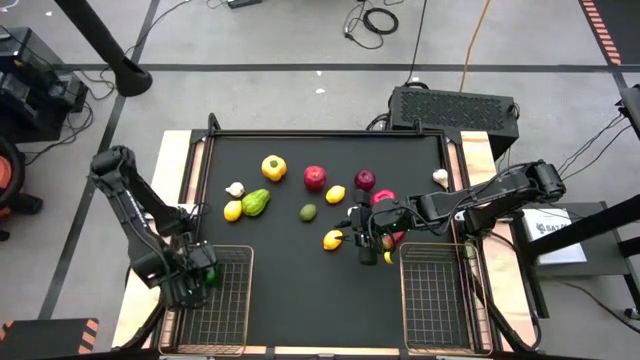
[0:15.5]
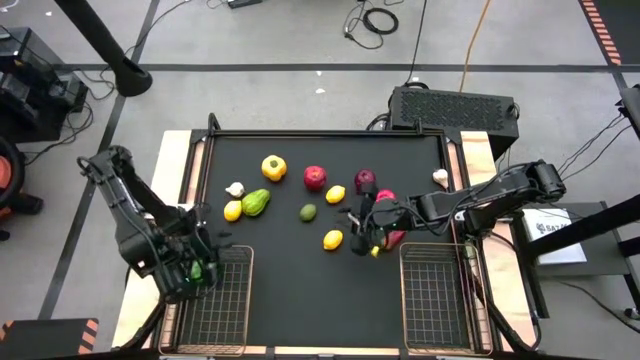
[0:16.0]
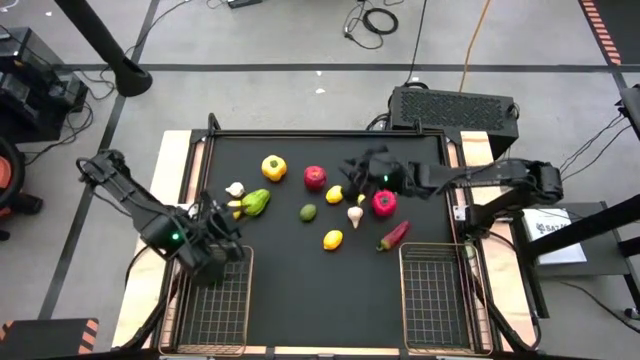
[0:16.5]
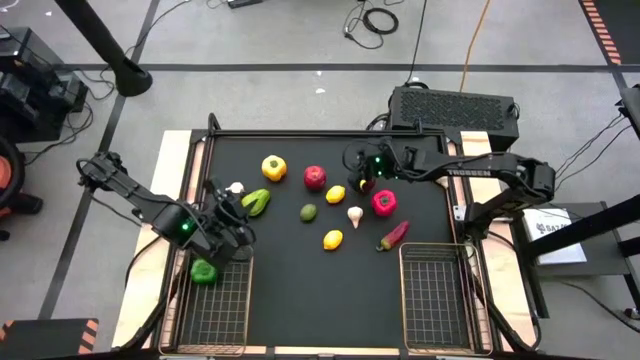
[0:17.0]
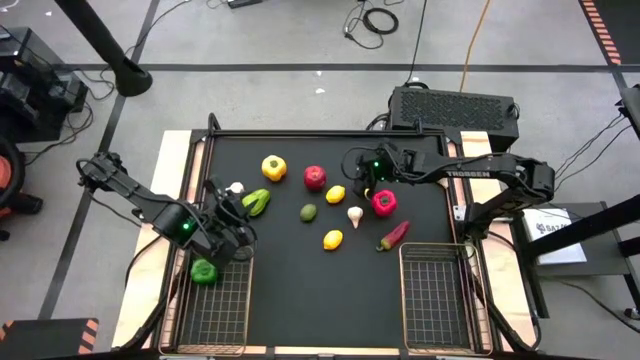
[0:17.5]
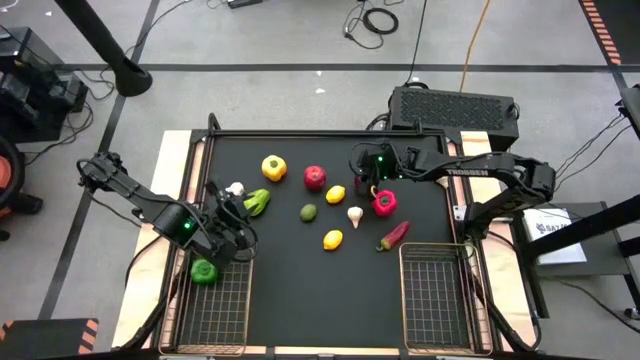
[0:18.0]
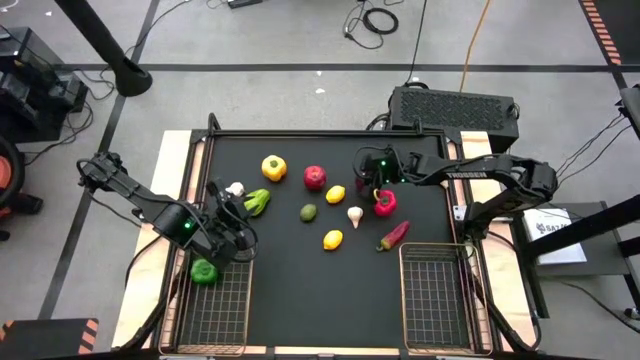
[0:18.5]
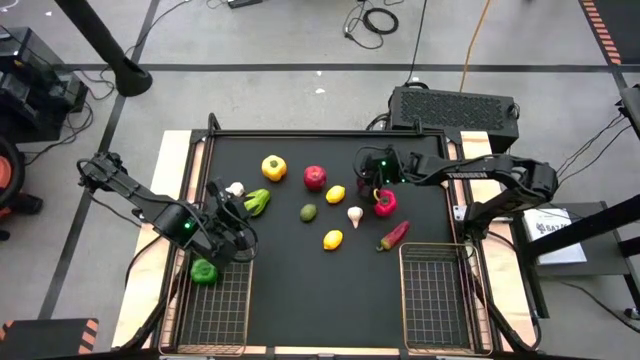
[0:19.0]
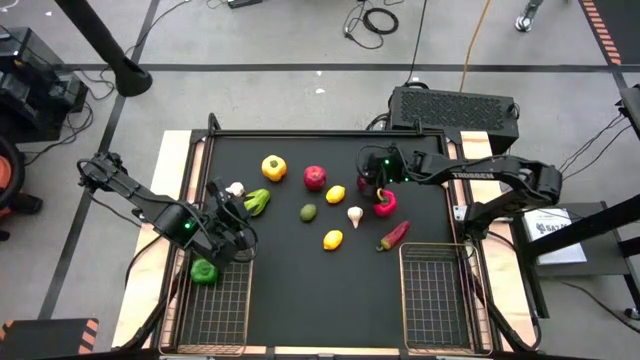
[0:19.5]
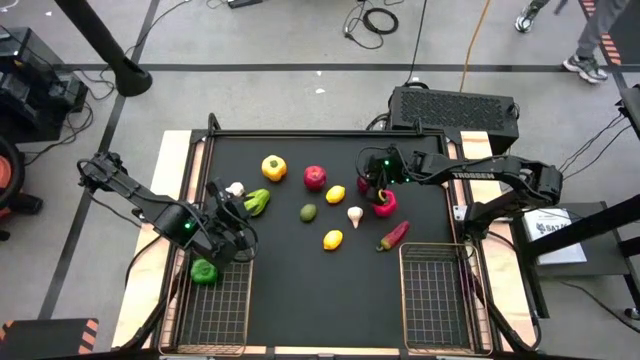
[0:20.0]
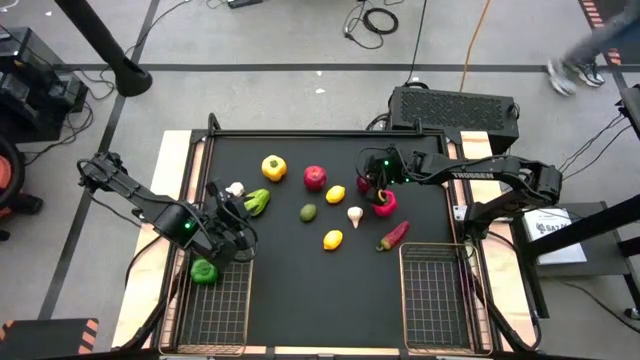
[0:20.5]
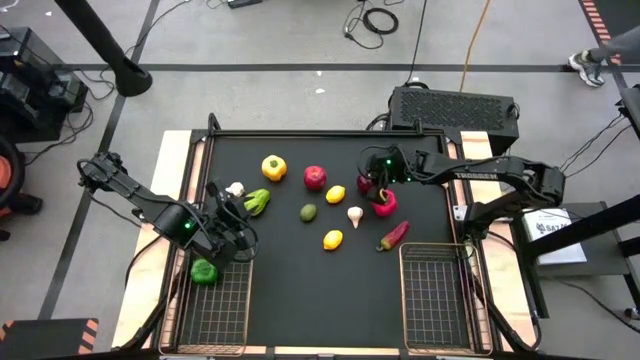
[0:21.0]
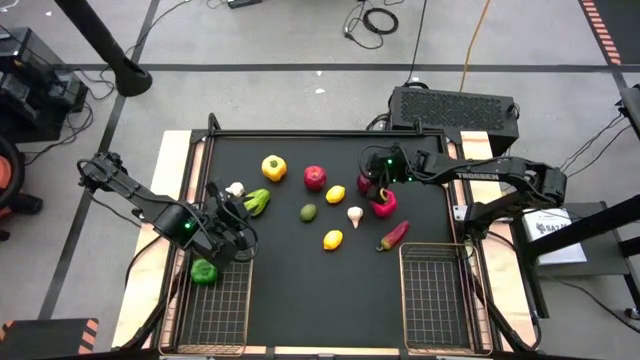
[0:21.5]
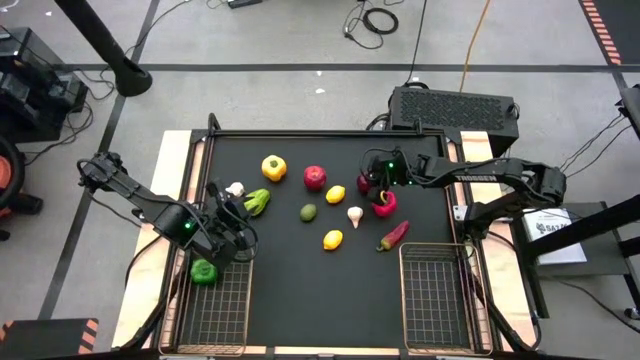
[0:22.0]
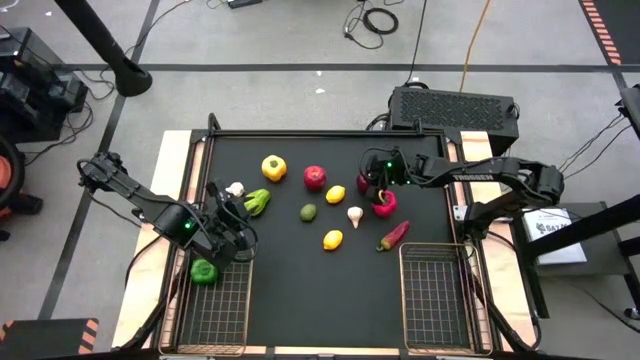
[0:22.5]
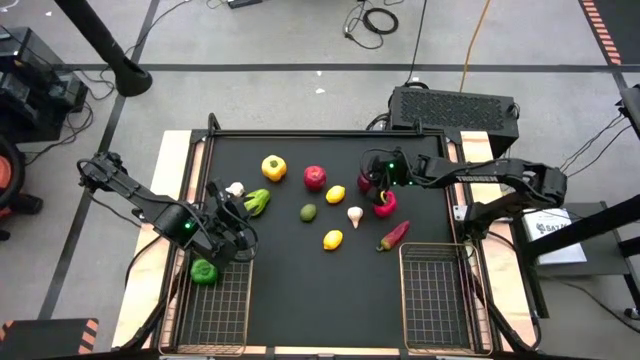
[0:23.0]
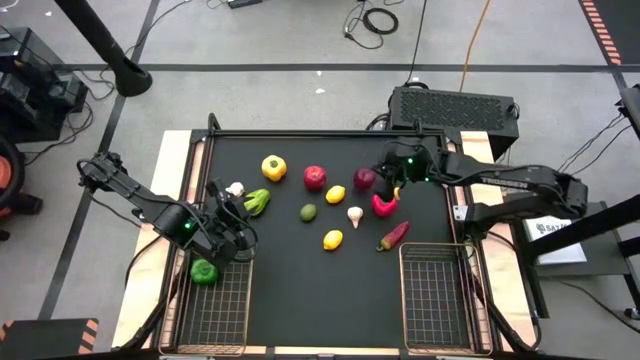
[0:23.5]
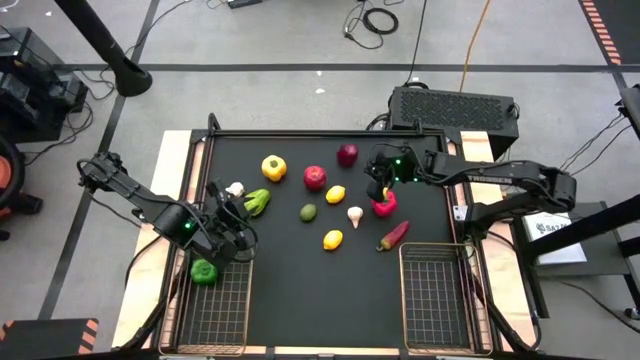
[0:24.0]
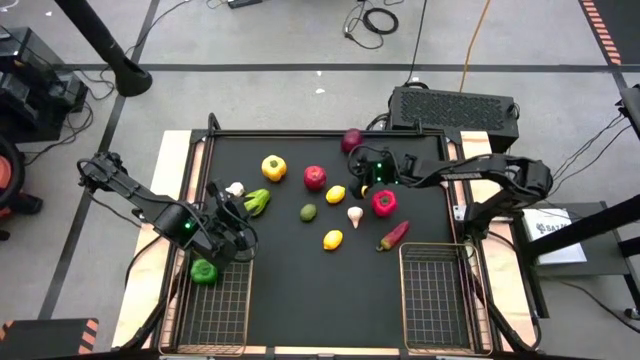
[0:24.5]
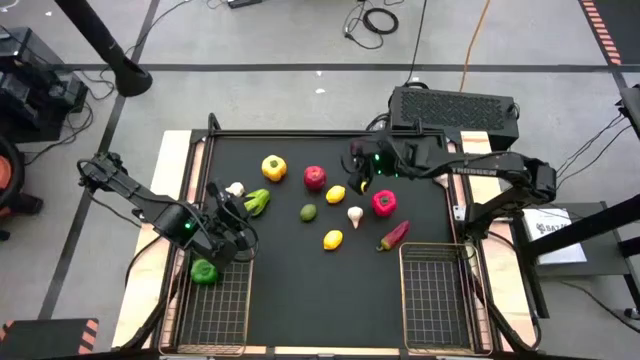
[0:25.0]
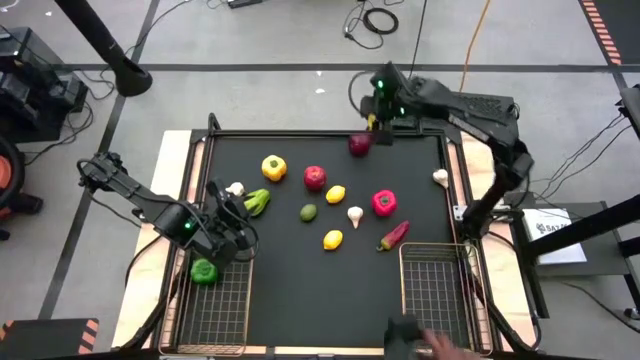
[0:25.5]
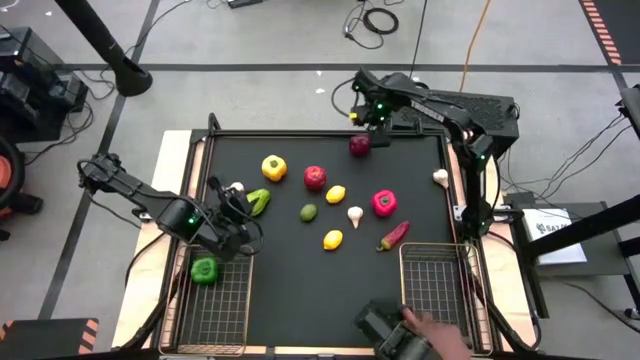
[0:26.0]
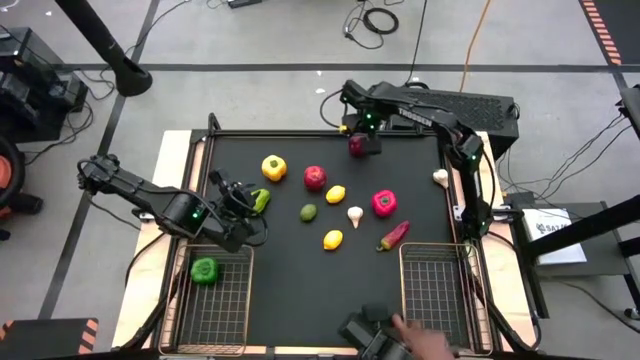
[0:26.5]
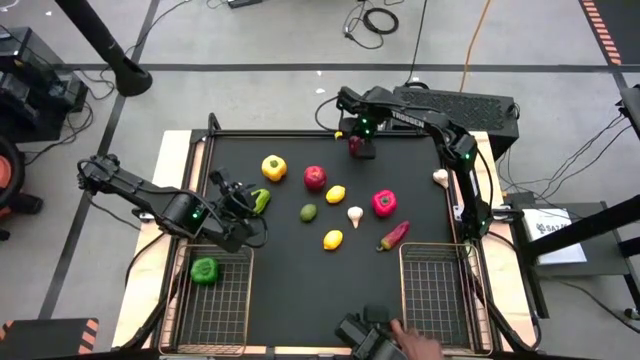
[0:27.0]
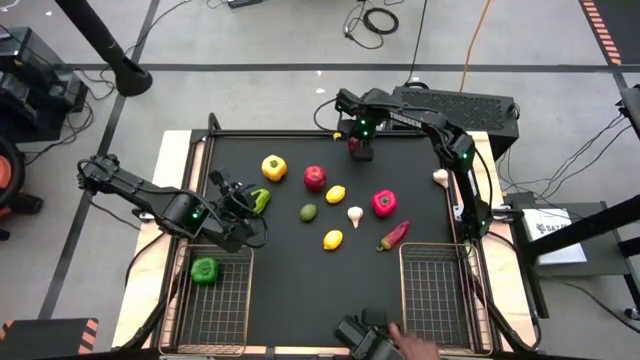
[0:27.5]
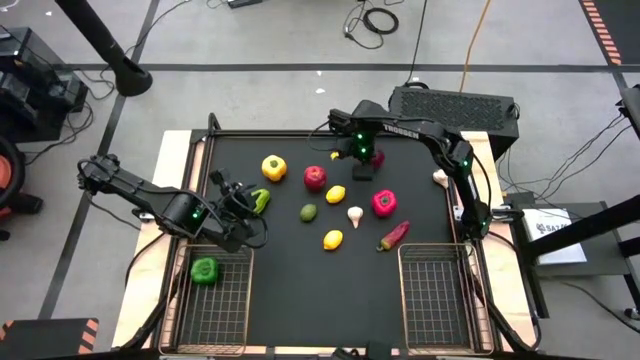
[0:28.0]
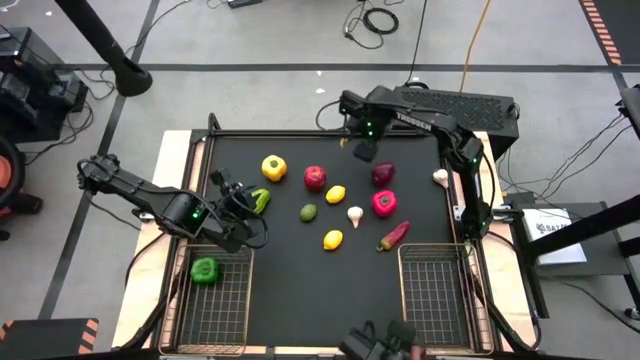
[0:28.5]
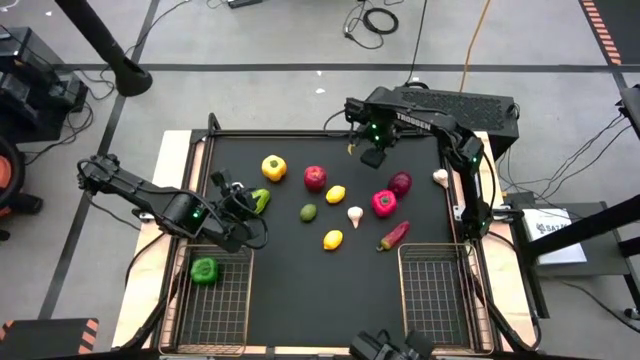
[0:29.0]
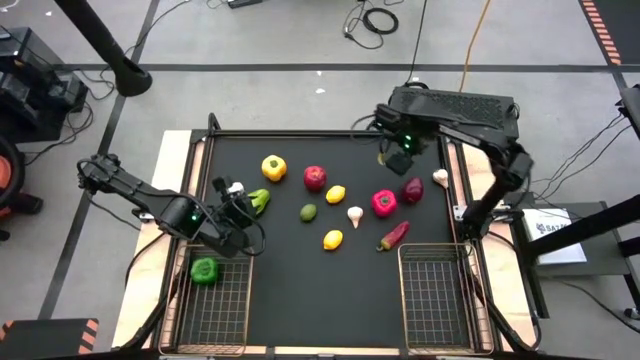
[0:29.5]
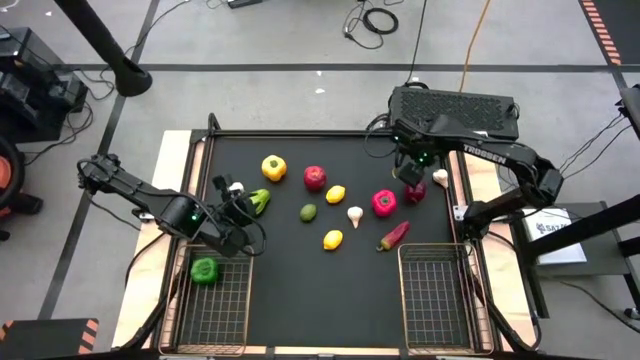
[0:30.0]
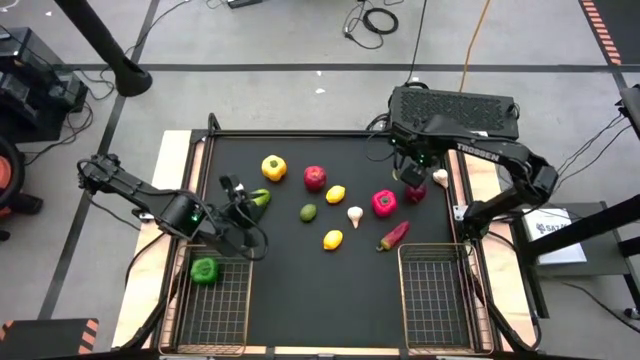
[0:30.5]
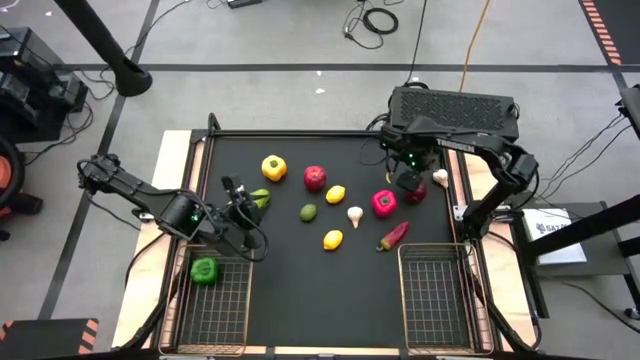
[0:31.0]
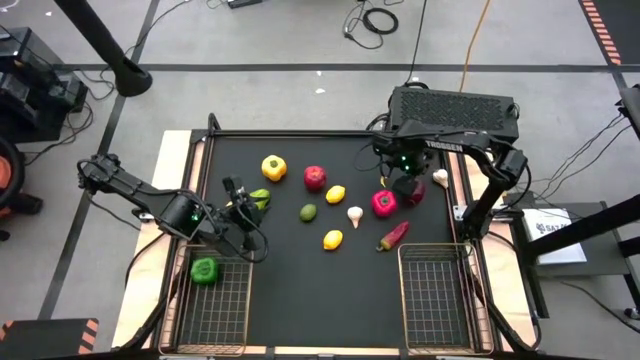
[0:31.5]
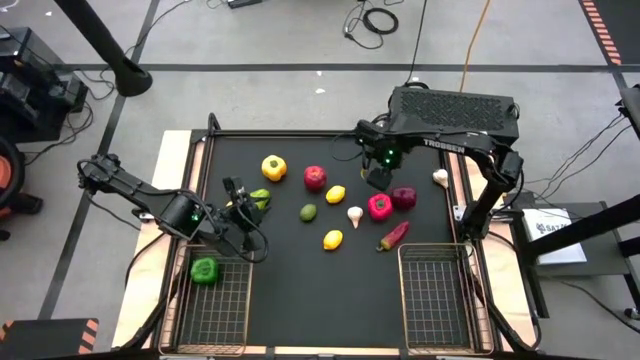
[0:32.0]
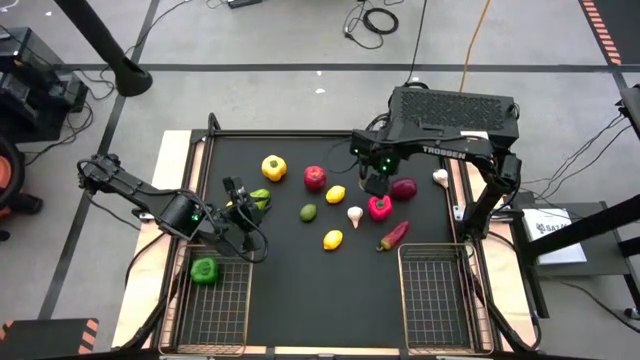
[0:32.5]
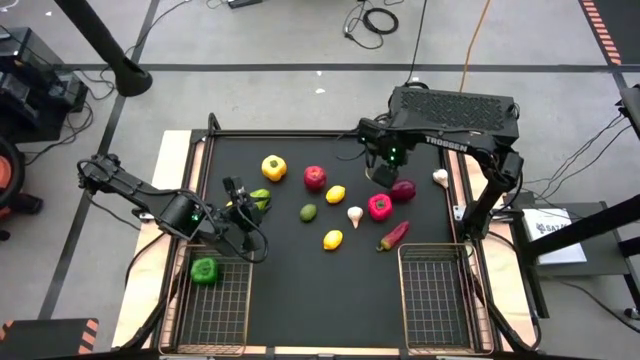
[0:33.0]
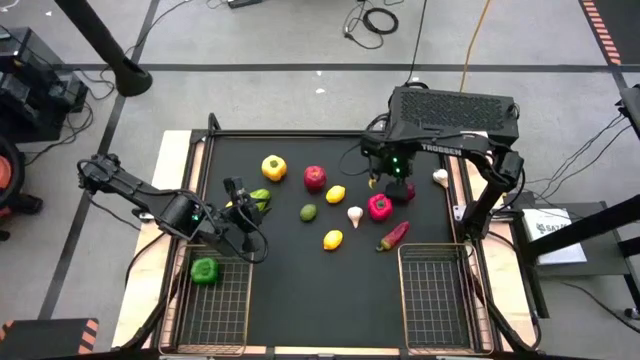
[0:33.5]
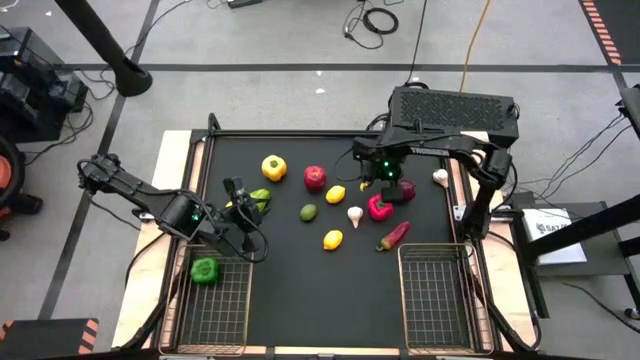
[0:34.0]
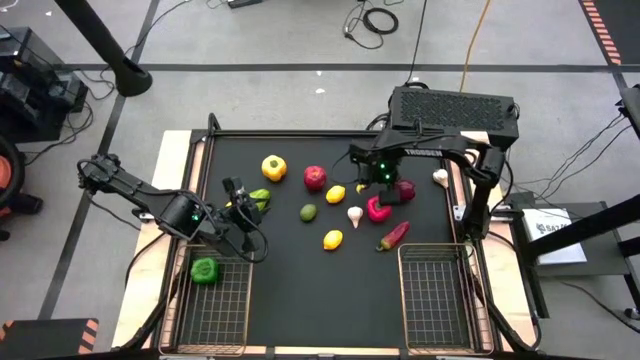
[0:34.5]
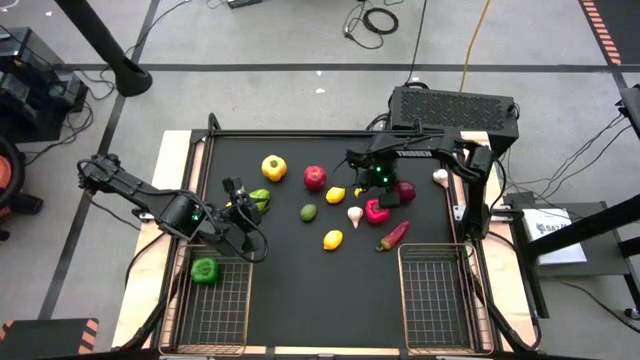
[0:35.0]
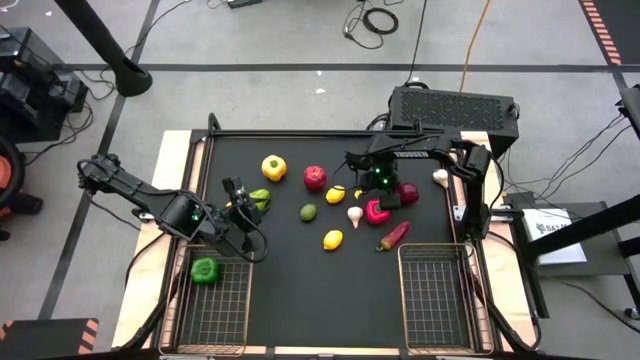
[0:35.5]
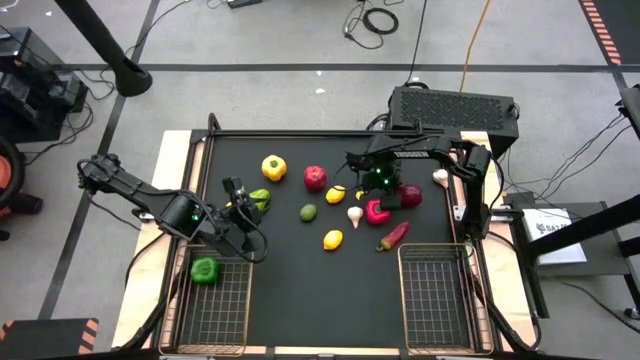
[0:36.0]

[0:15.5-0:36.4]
Task: Sort produce into baskets
Put the right apple into the right gold wire basket
